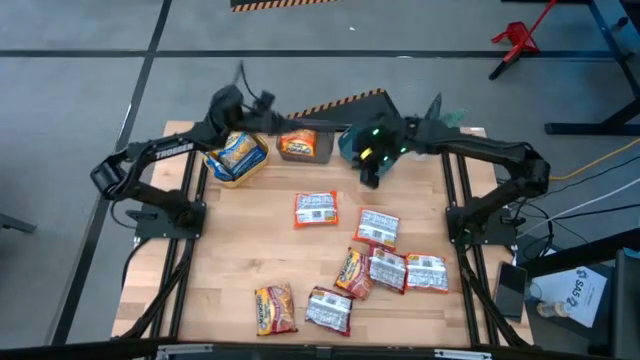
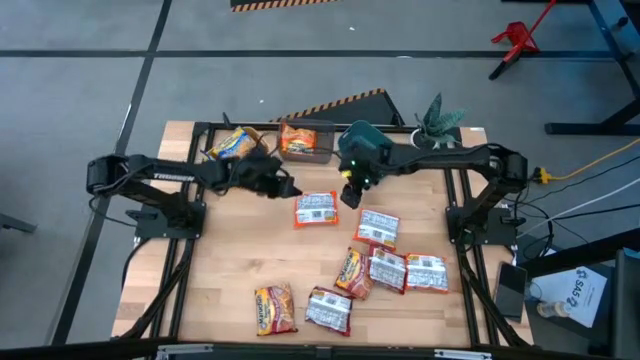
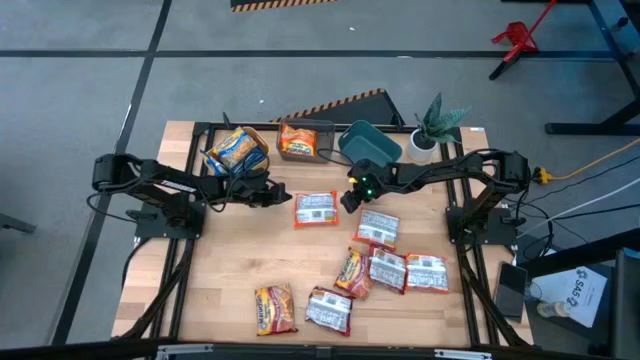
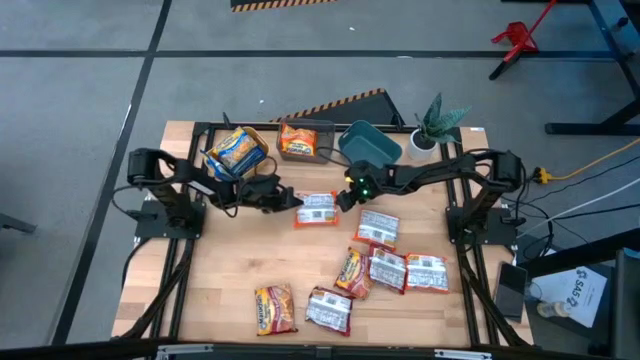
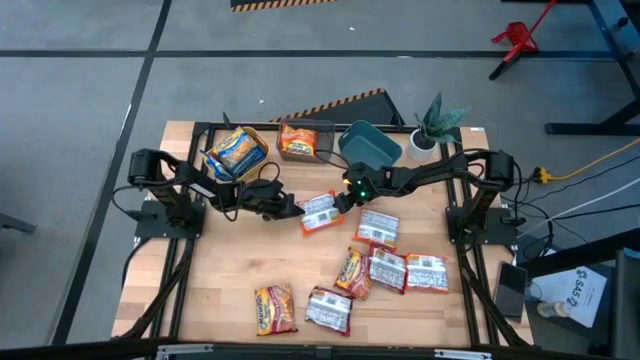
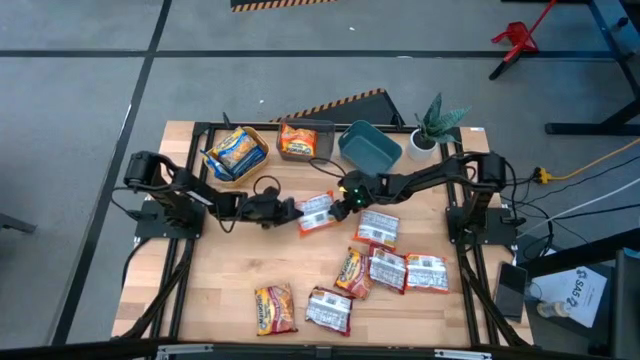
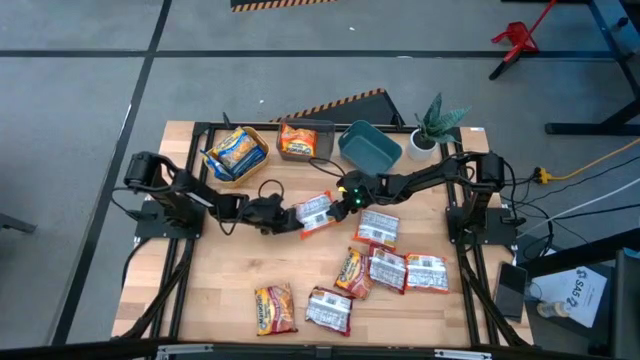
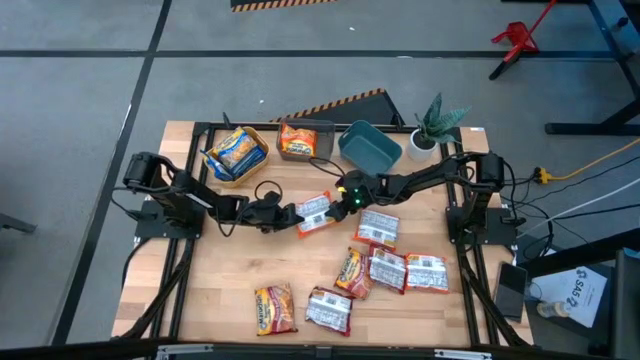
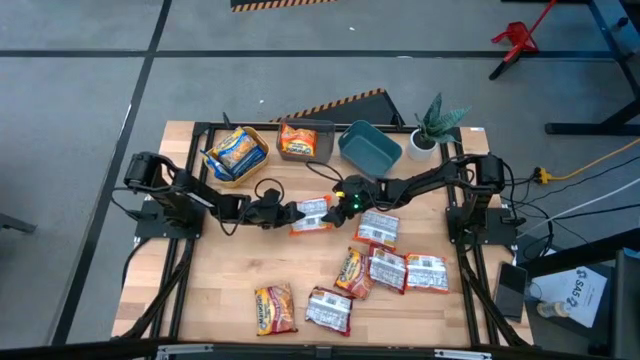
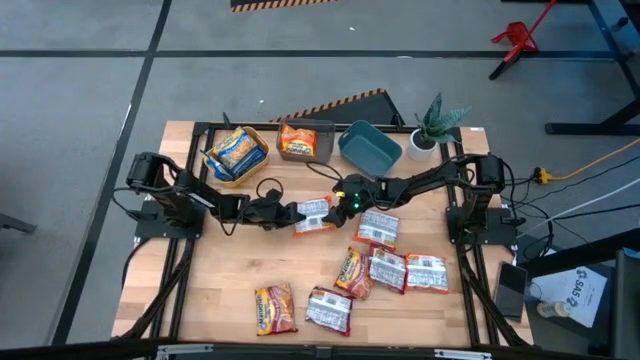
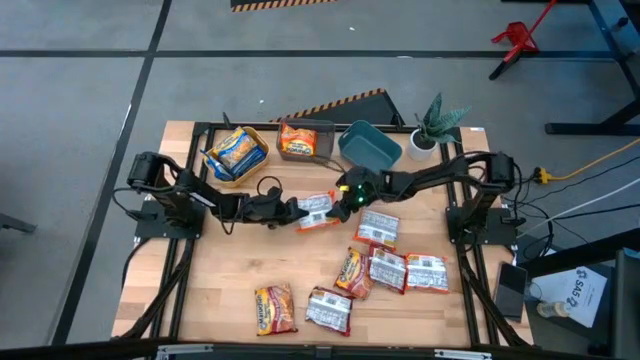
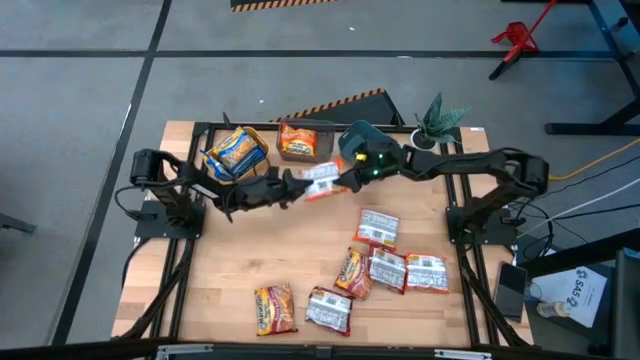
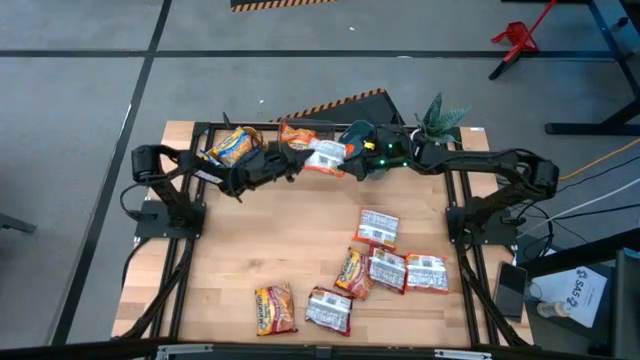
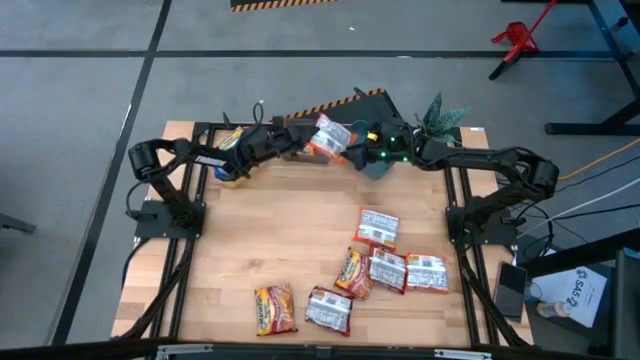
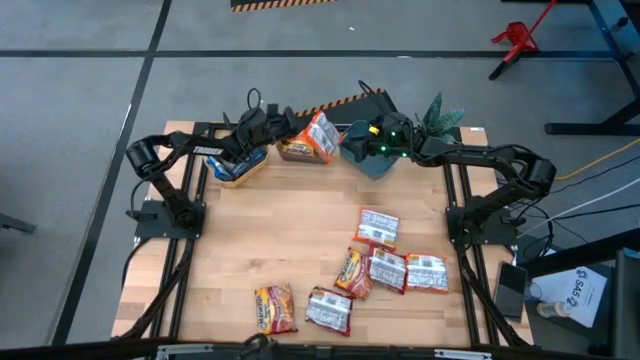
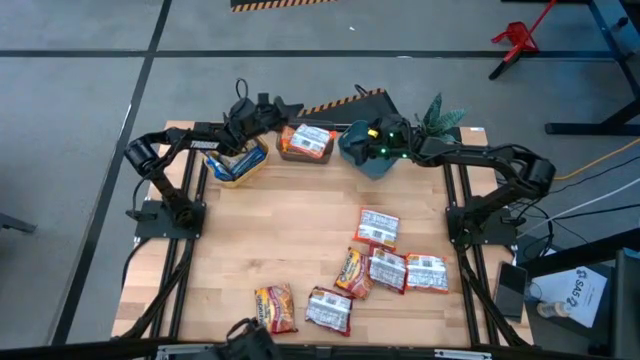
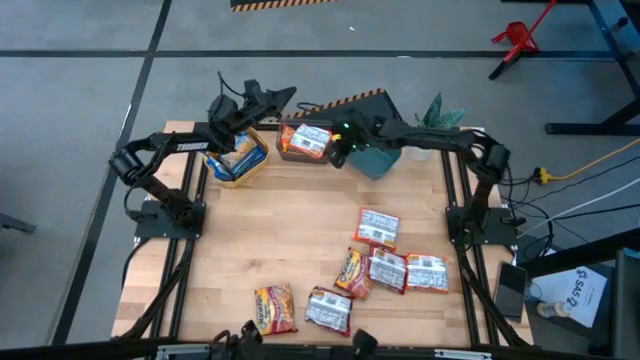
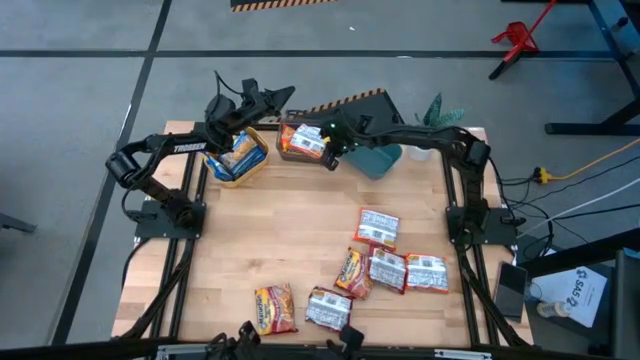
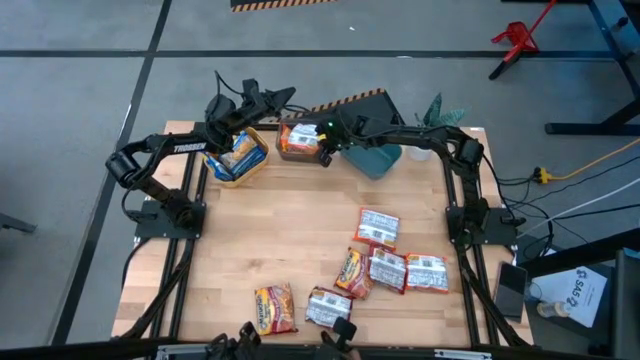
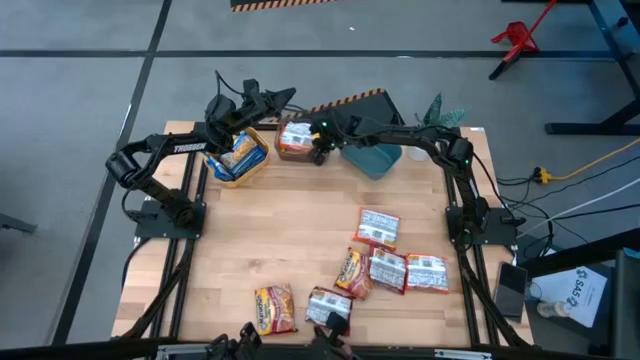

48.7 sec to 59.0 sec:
Task: Sort Maruchan noodles
Put the orange noodle pack into the black bin

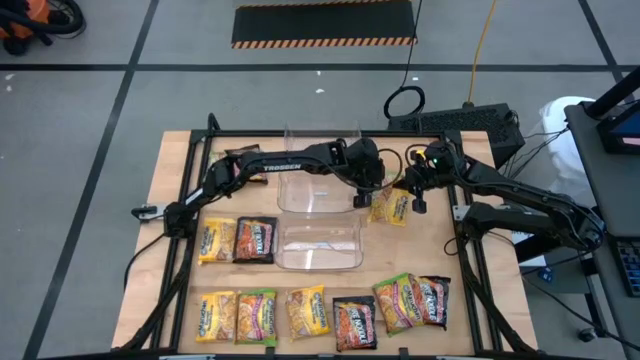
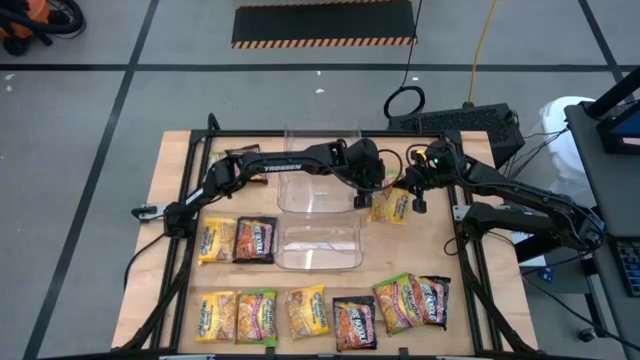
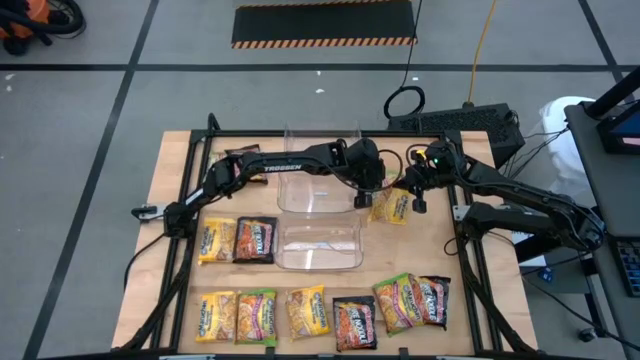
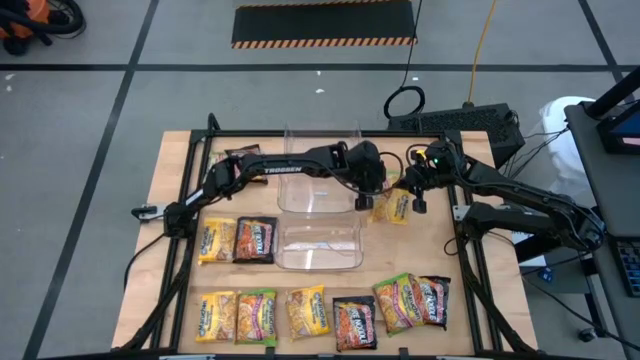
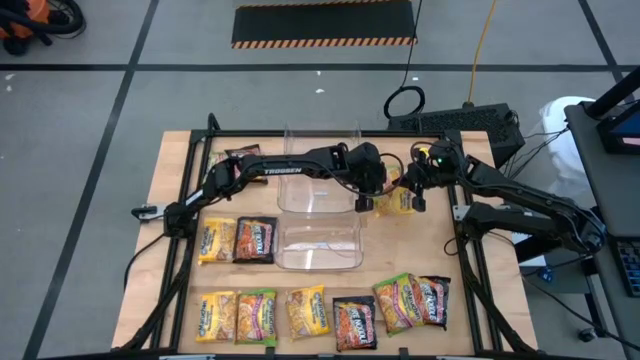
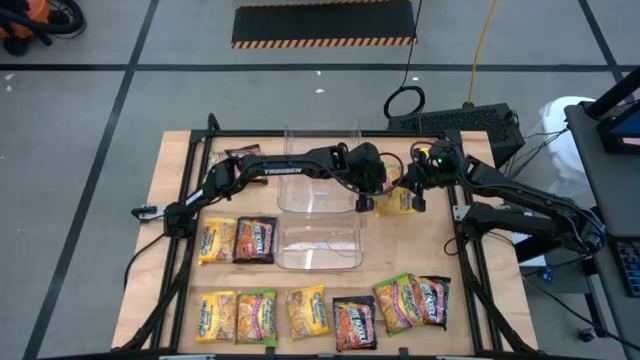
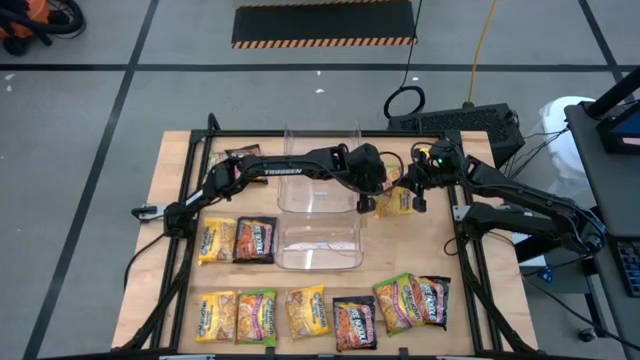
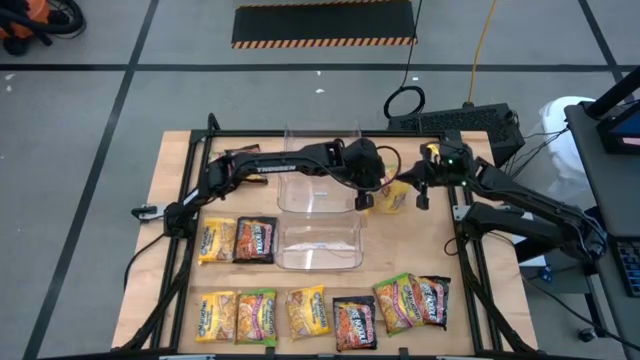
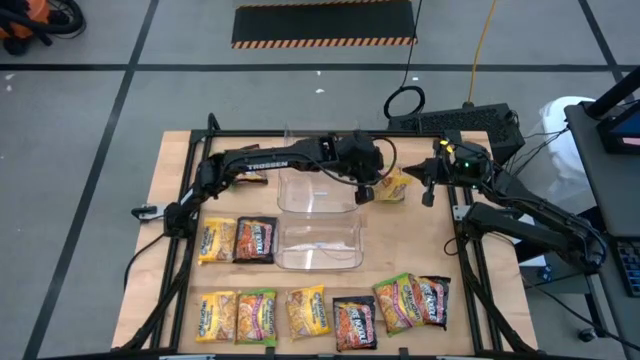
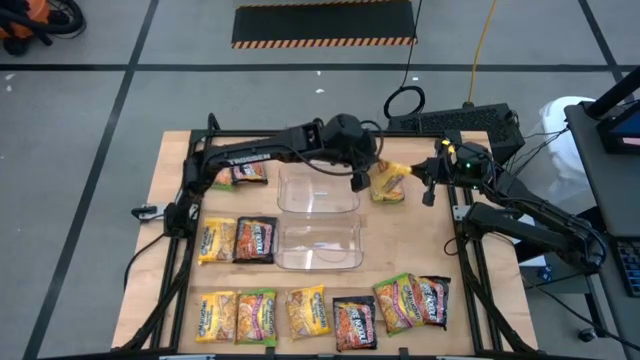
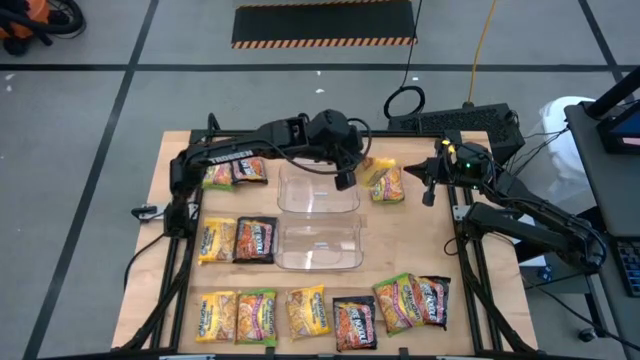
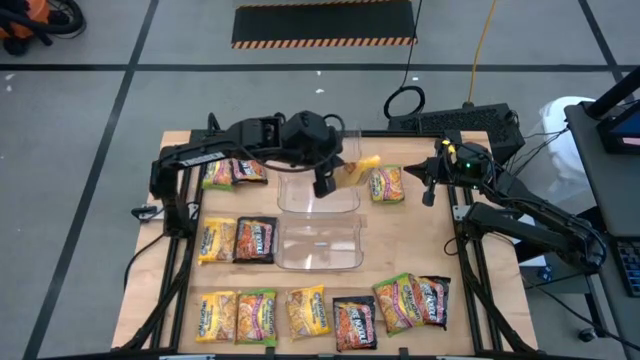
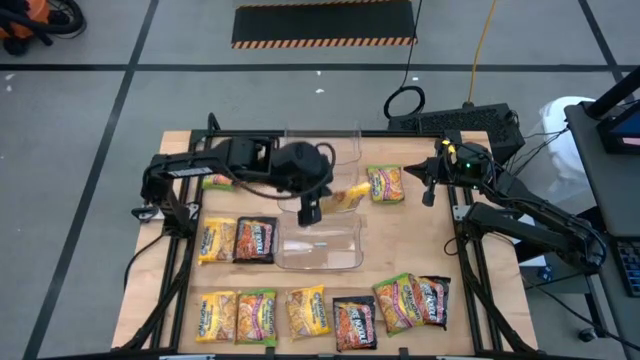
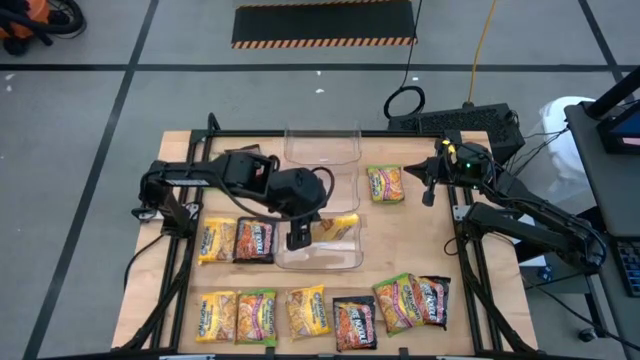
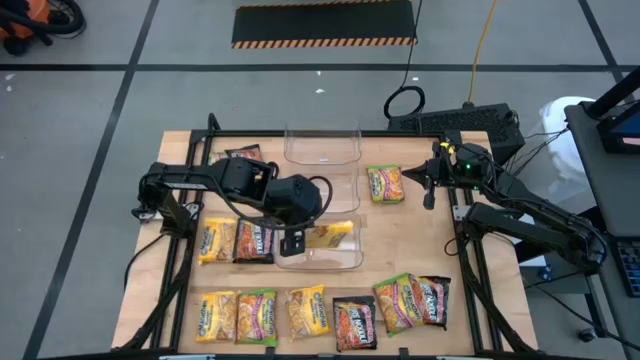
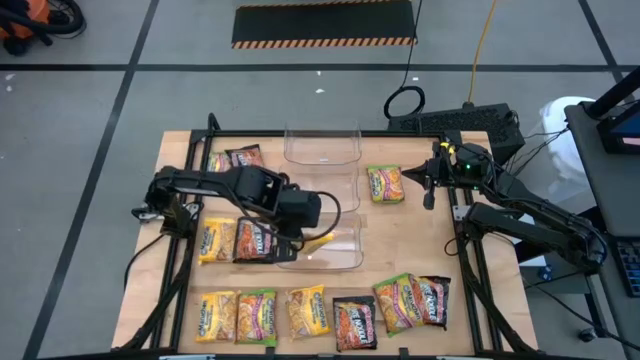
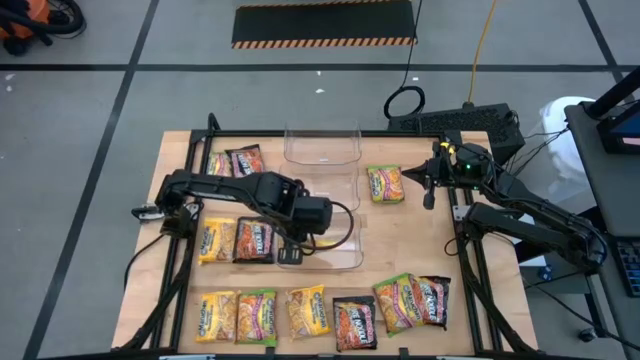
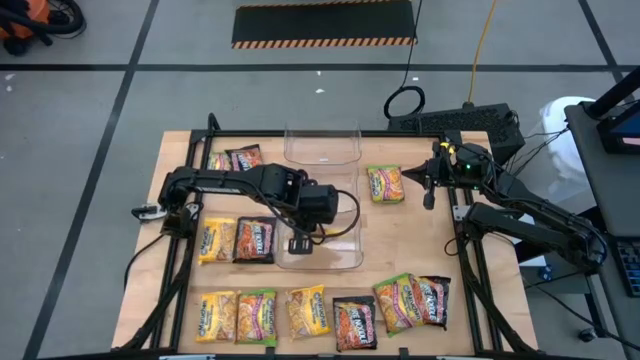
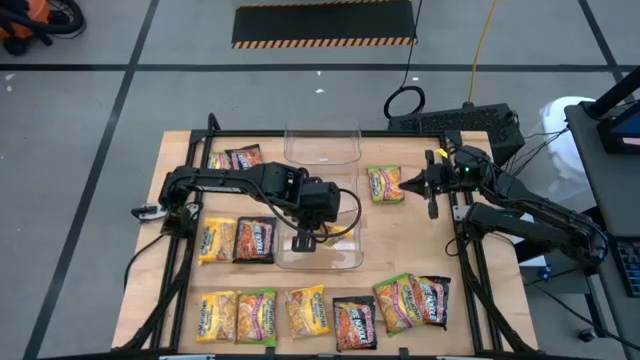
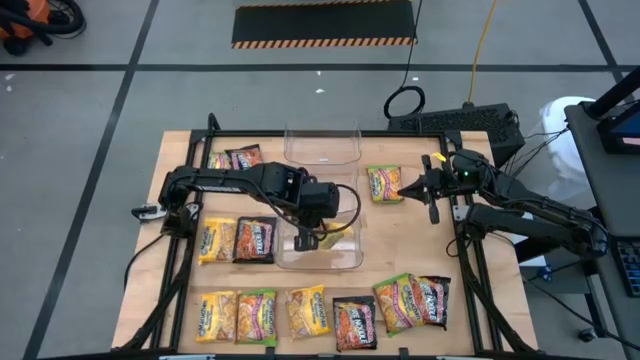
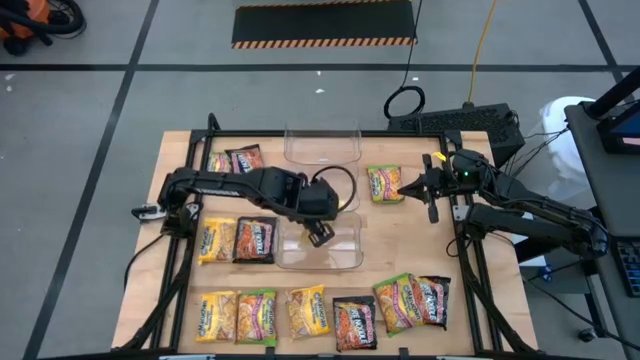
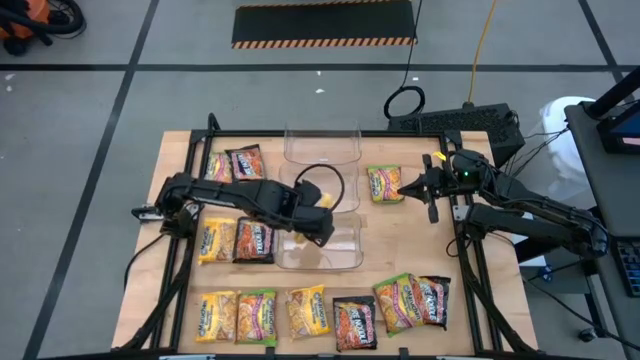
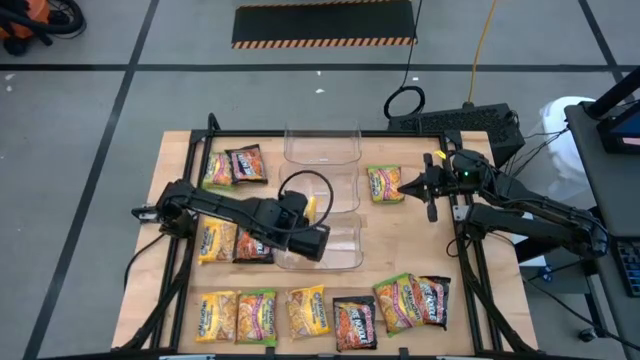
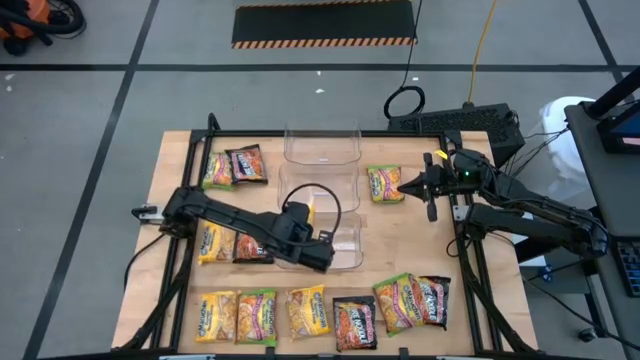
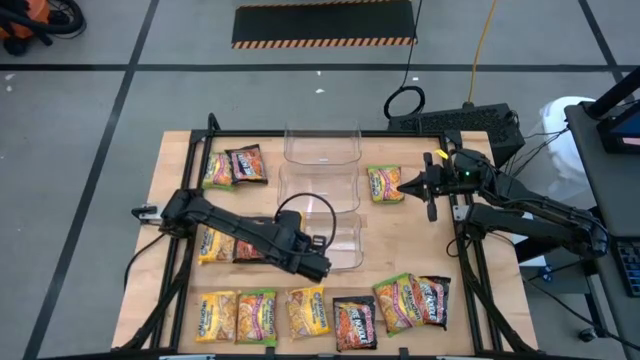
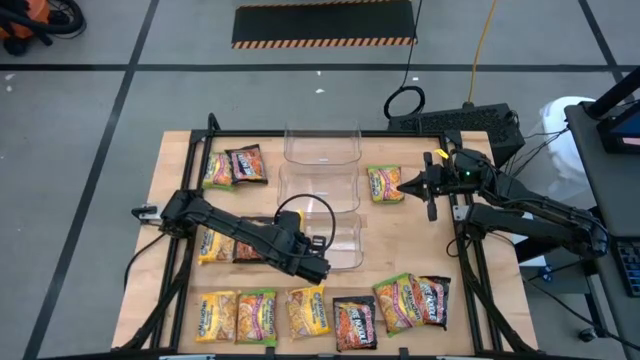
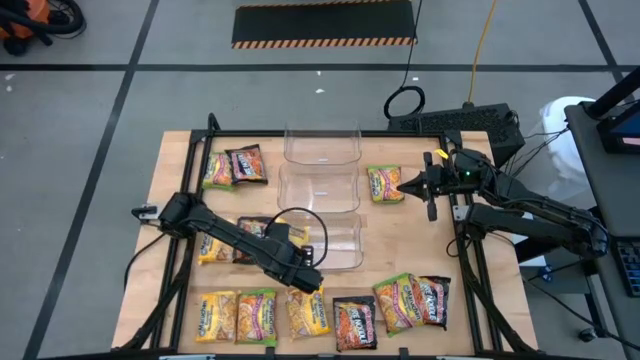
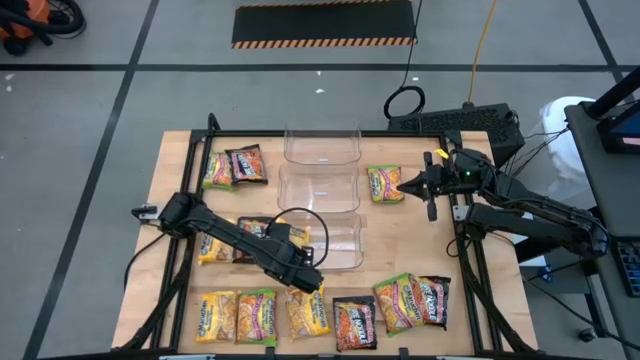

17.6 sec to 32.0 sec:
Task: Sort Maruchan noodles
Put the yellow noodle pack into the bottom transparent bin
